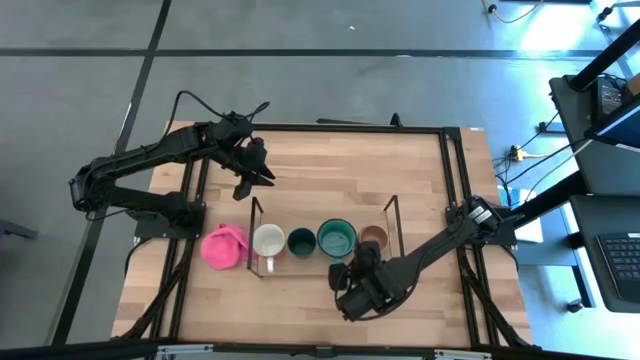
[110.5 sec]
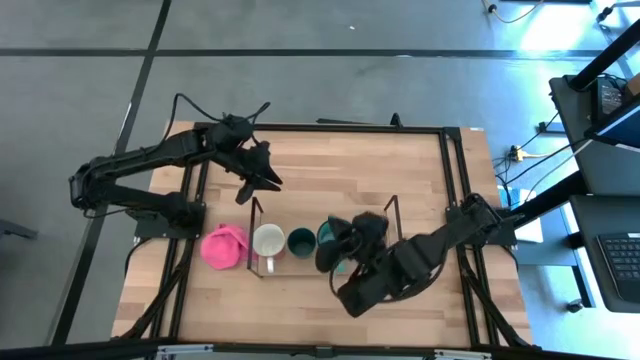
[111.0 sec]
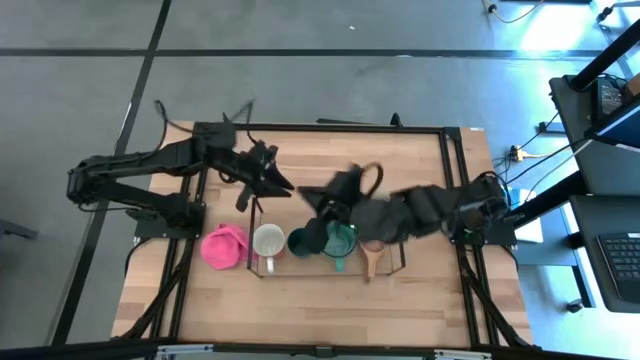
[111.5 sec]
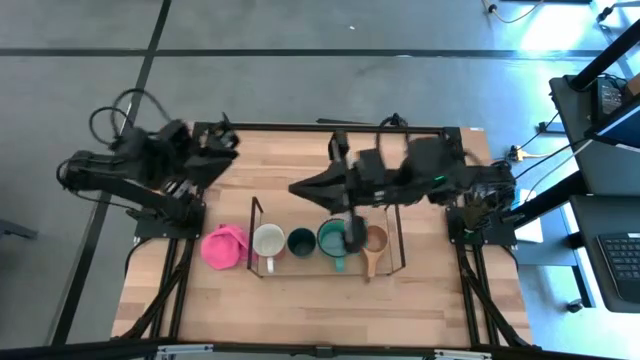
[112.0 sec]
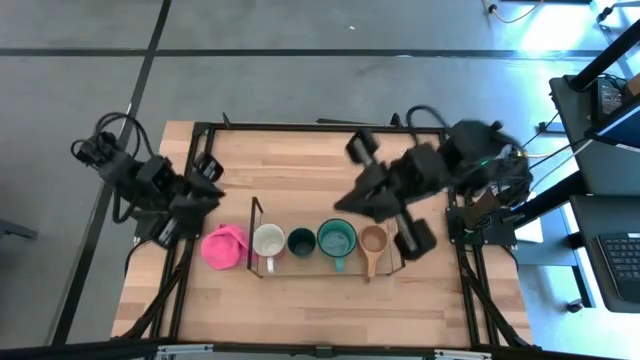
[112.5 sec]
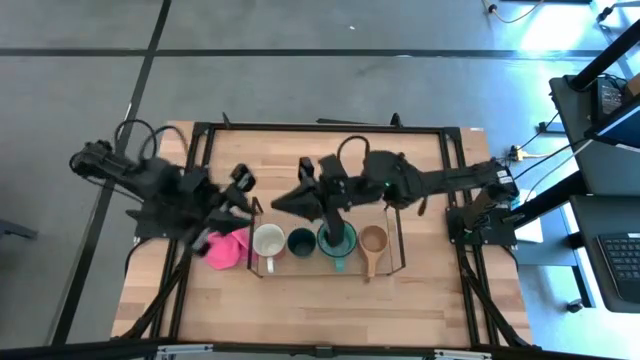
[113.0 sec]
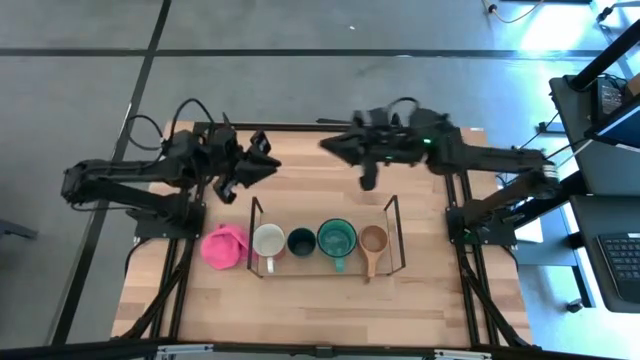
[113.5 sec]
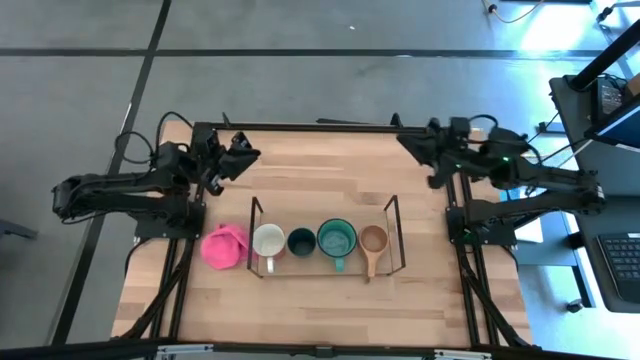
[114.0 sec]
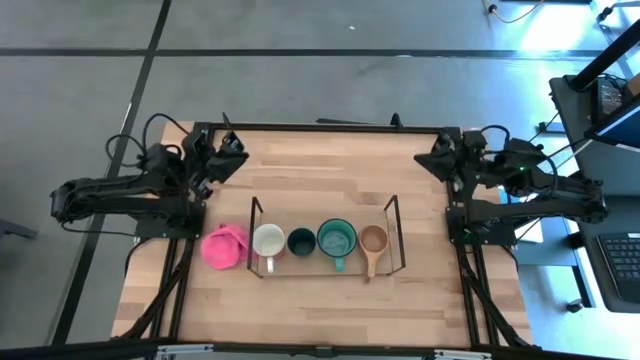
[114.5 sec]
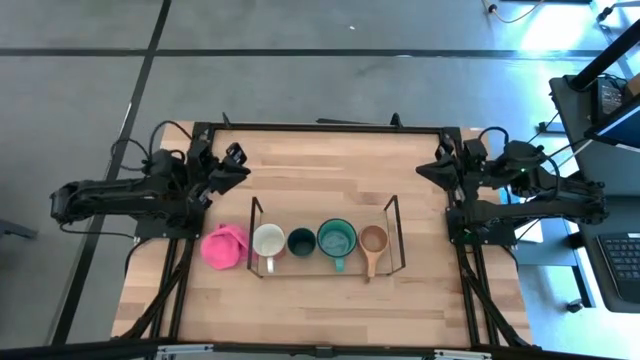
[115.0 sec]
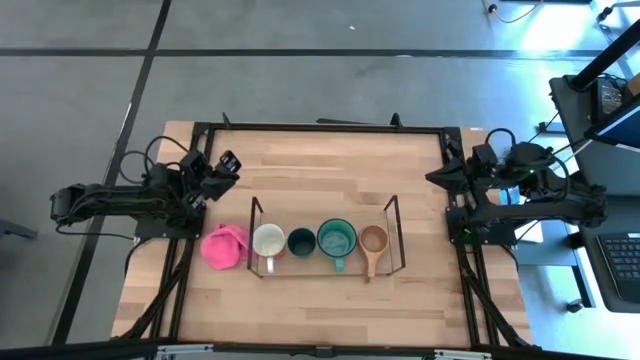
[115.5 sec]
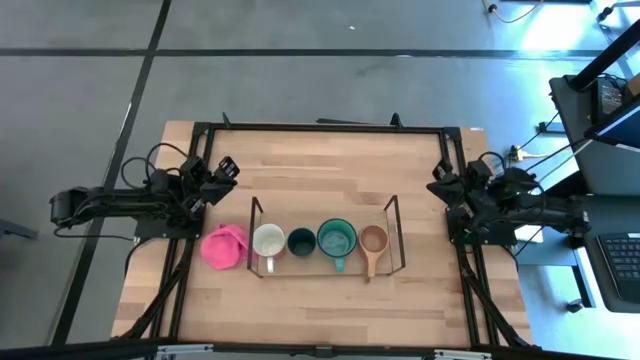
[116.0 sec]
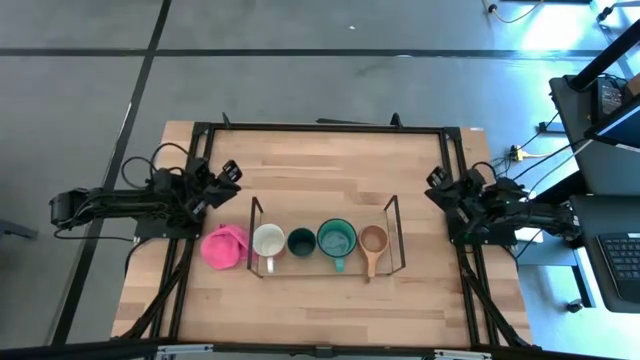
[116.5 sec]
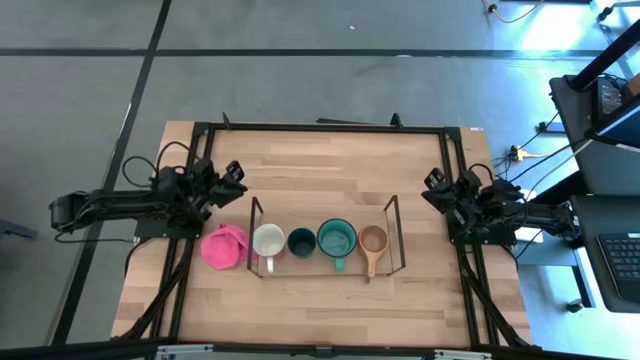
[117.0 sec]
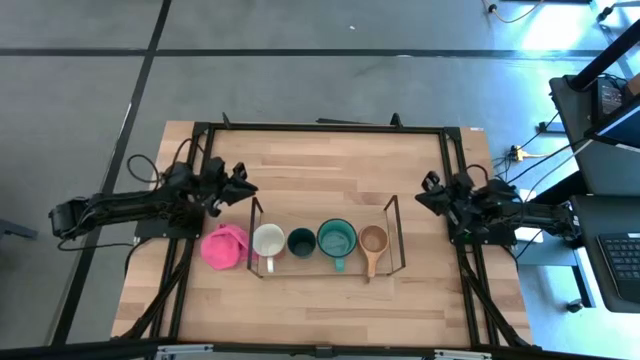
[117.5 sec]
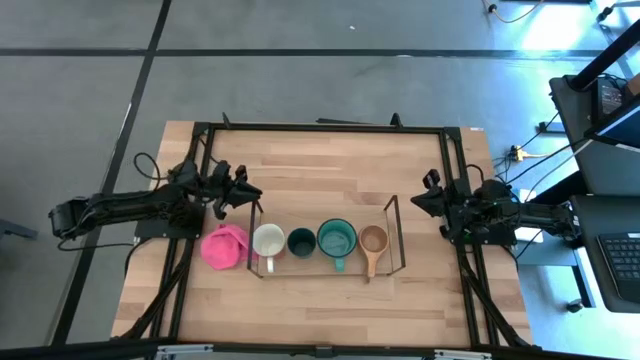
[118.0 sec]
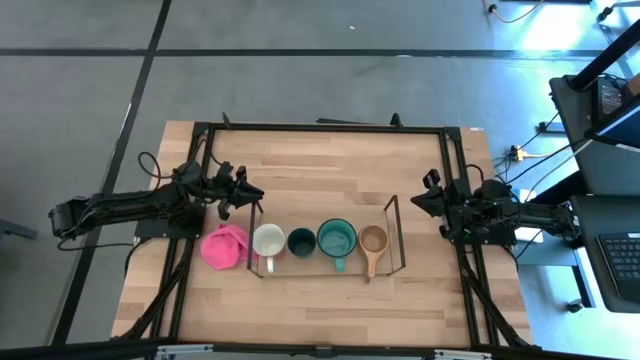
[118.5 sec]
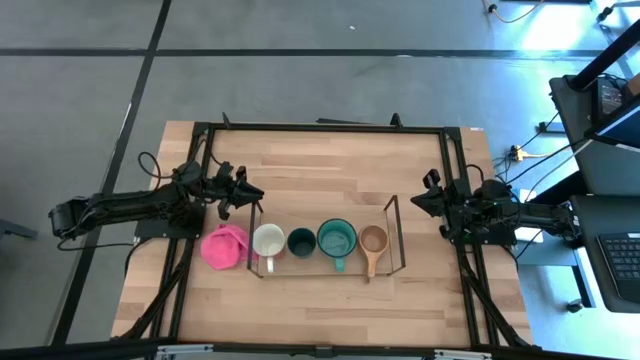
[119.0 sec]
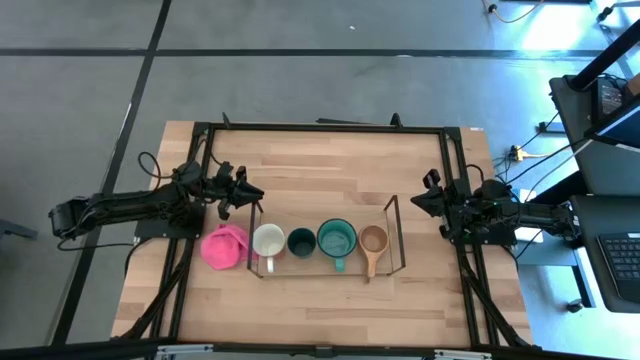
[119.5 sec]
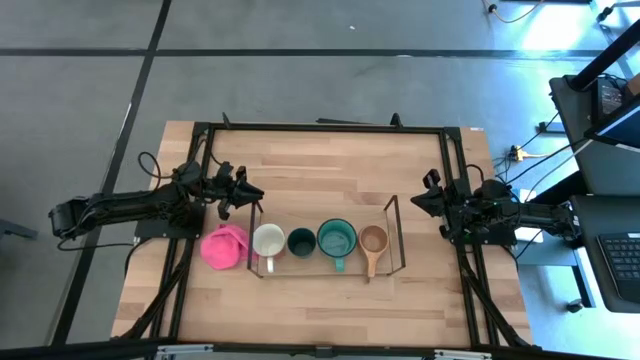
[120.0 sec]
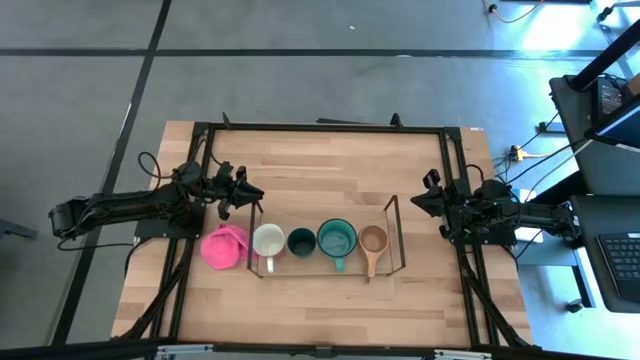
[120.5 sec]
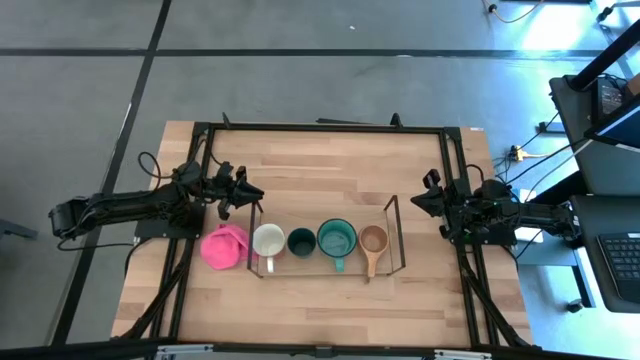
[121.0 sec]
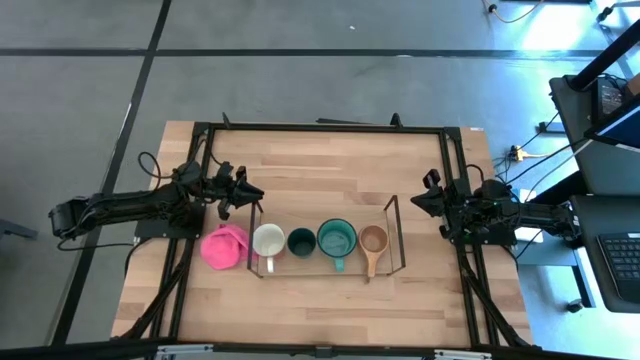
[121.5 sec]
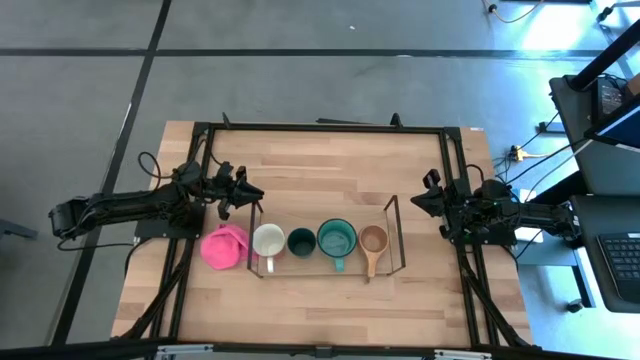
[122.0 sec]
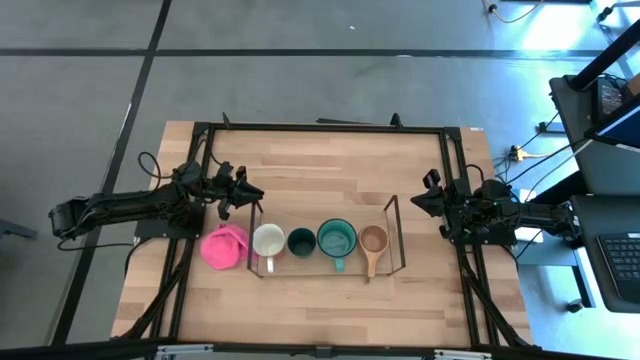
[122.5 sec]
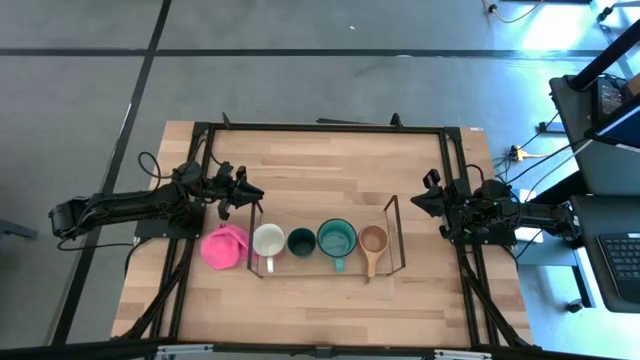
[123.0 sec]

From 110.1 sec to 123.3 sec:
Task: Stack small to large cups/mugs on shelf
Return to Home Position

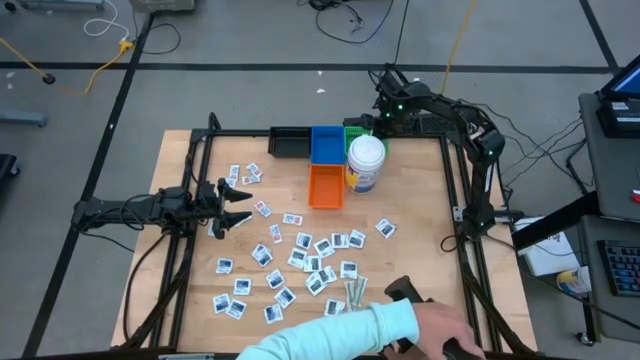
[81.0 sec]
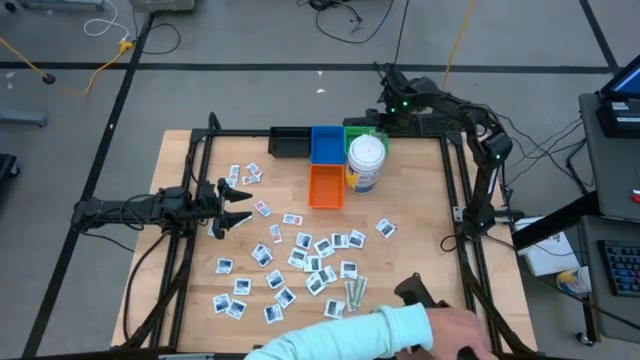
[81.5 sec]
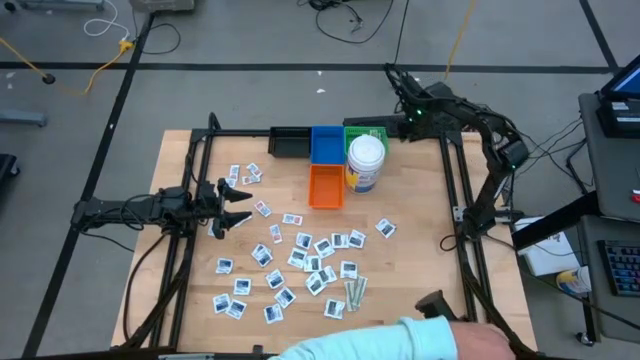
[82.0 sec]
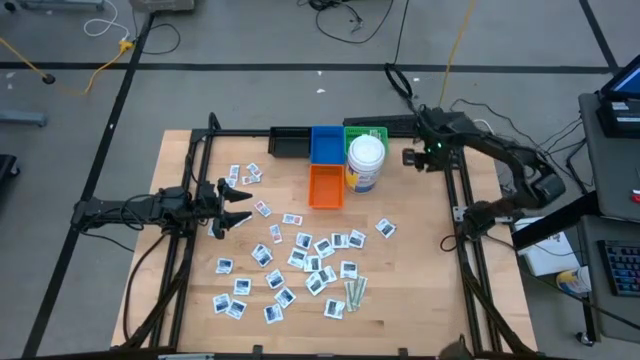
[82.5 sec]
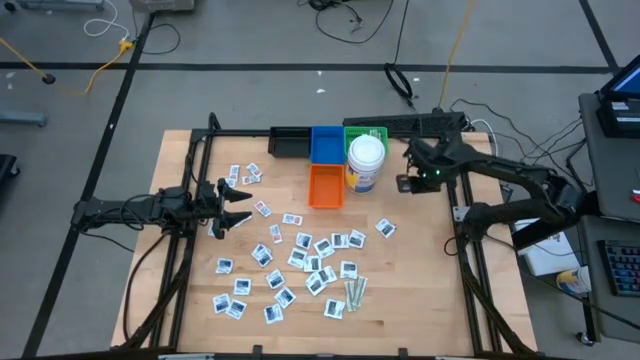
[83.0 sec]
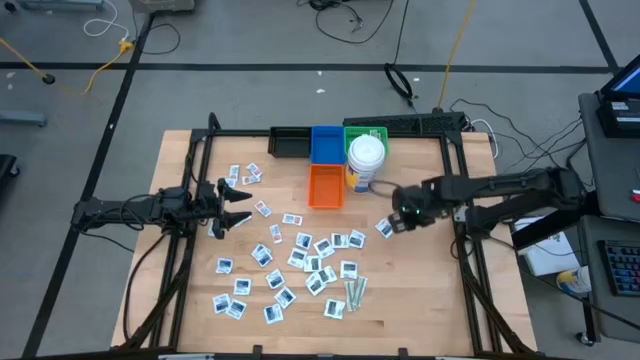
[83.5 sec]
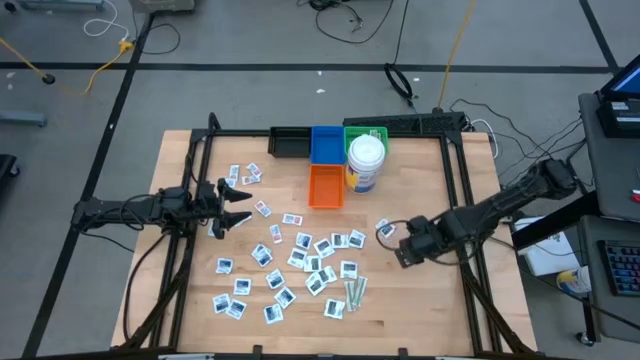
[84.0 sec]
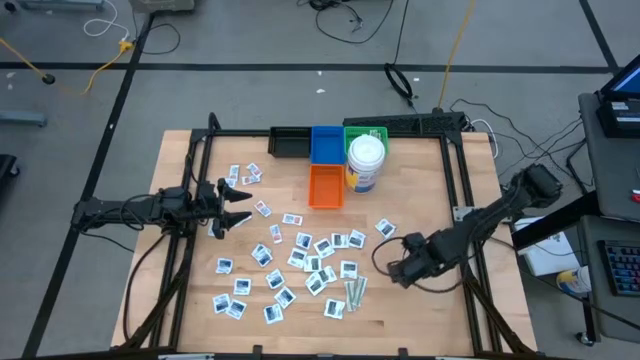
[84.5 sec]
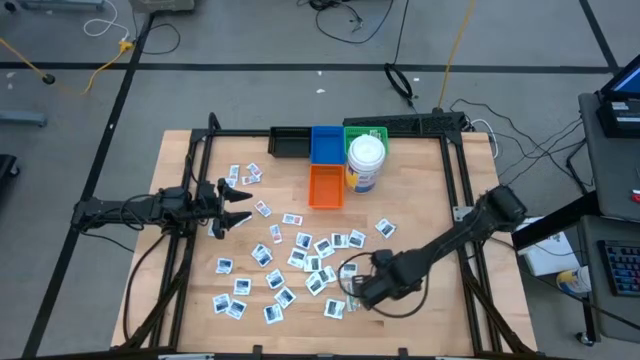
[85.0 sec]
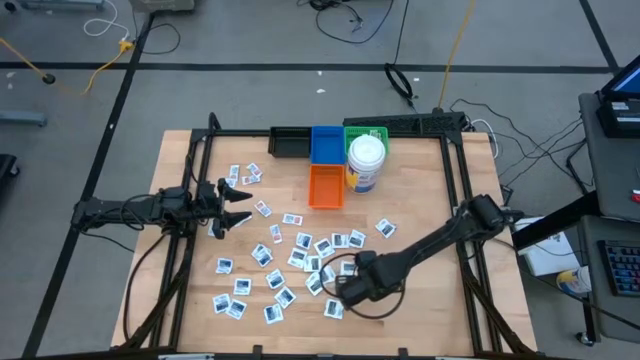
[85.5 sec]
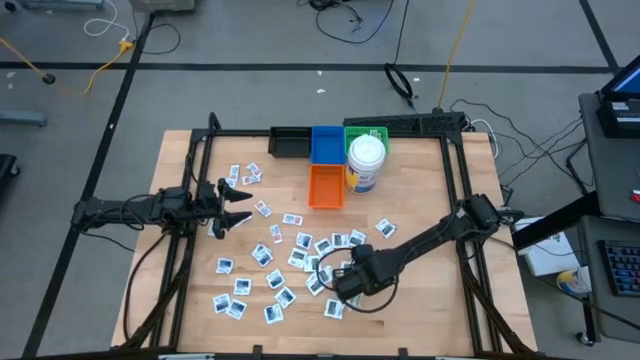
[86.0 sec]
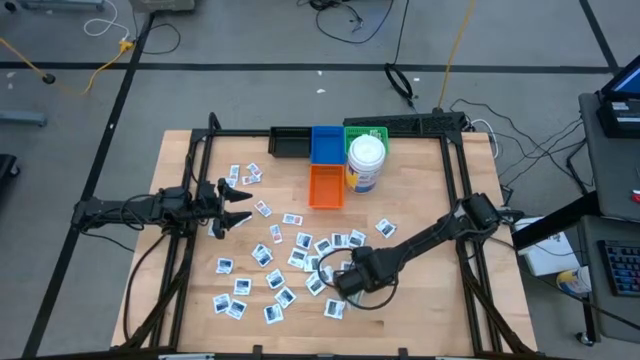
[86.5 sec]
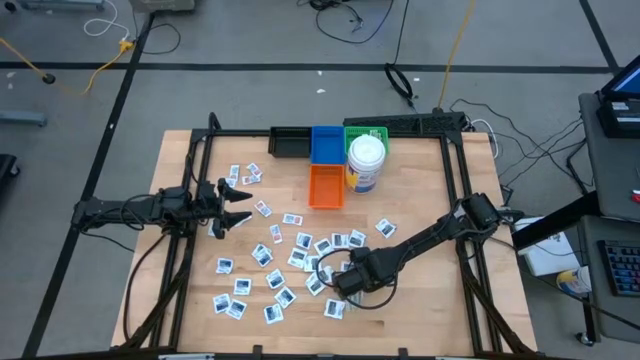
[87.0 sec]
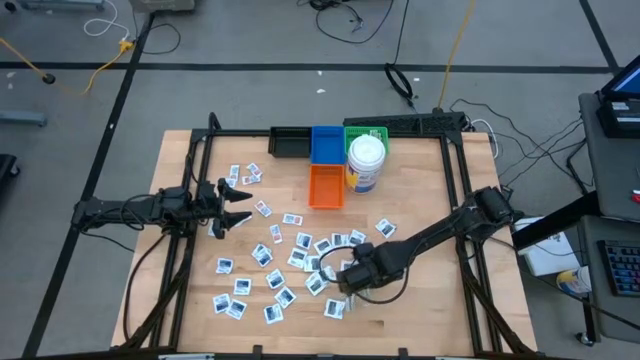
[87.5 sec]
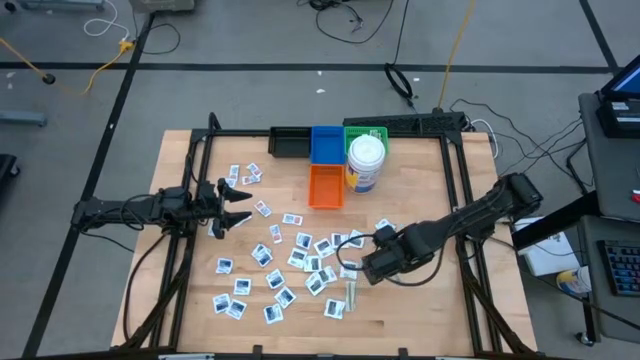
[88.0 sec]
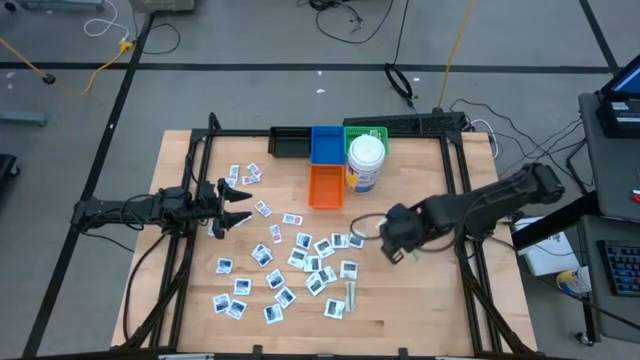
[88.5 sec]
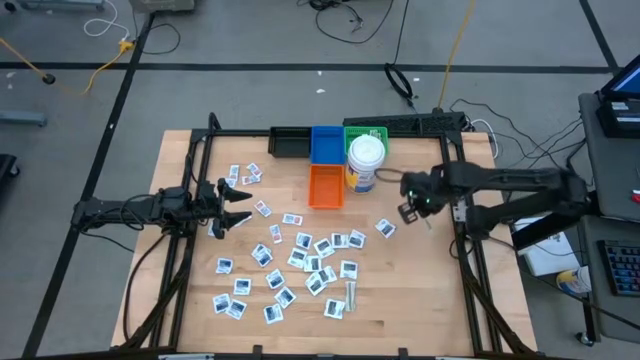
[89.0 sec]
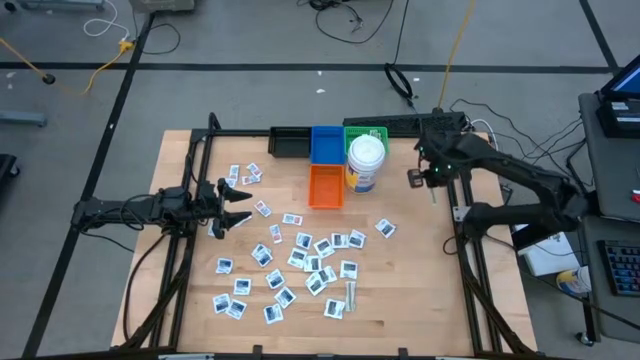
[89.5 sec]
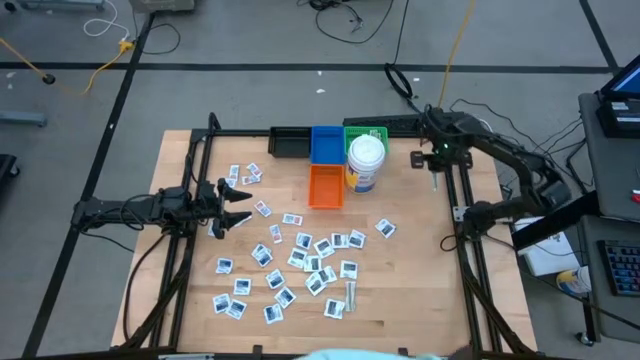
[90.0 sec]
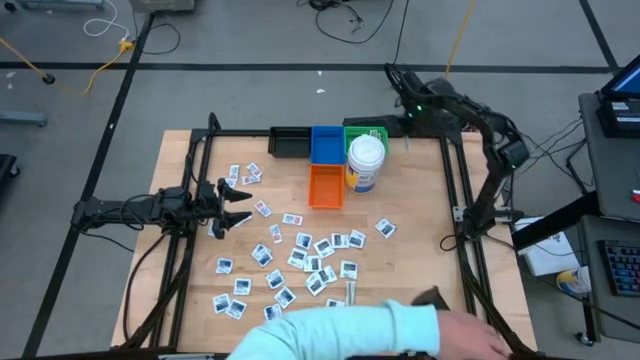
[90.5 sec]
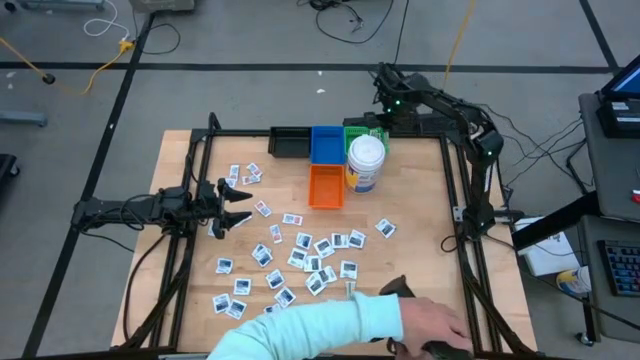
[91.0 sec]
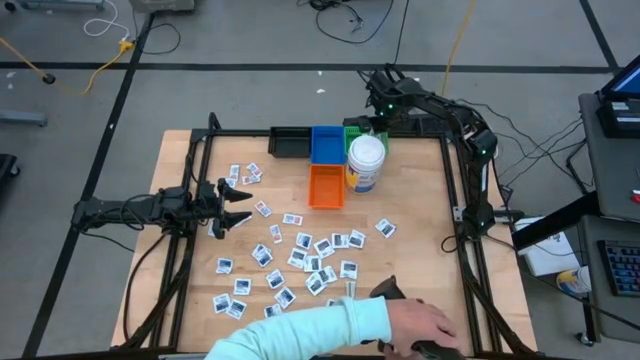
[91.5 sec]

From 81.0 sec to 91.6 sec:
Task: Pick & Place First Aid Supplies
Put the green bandage pack into the green bin
